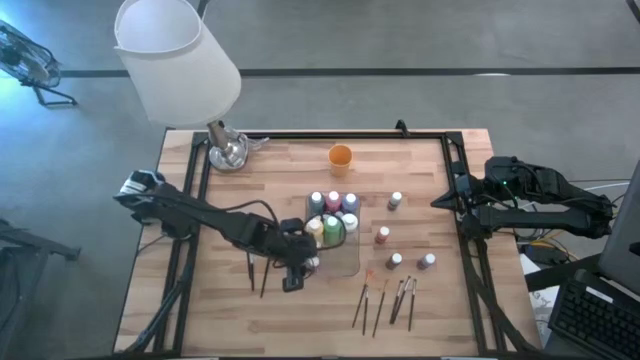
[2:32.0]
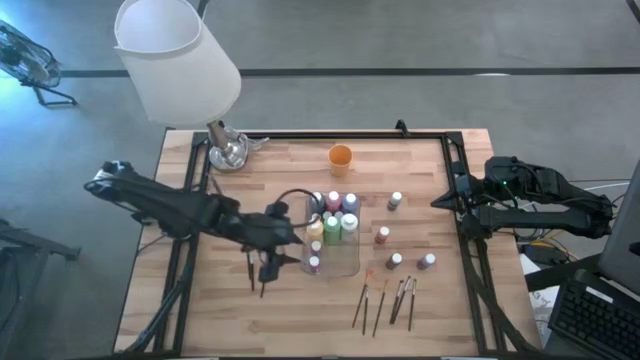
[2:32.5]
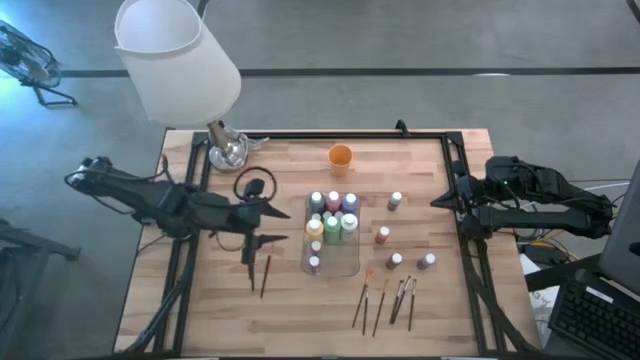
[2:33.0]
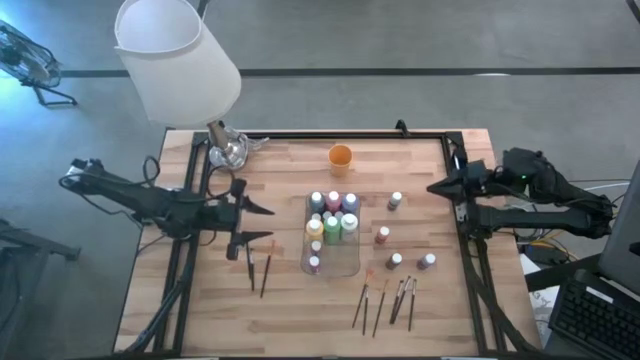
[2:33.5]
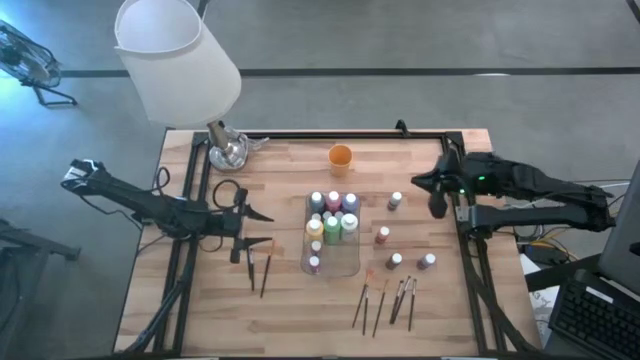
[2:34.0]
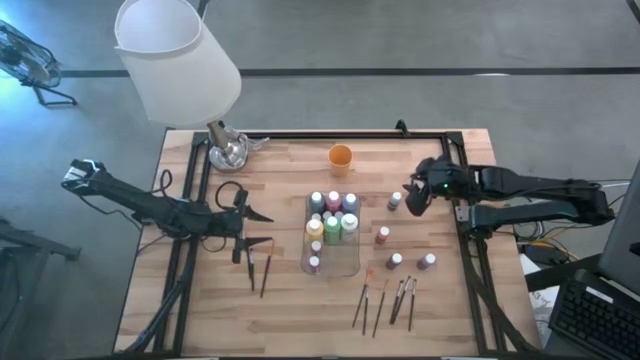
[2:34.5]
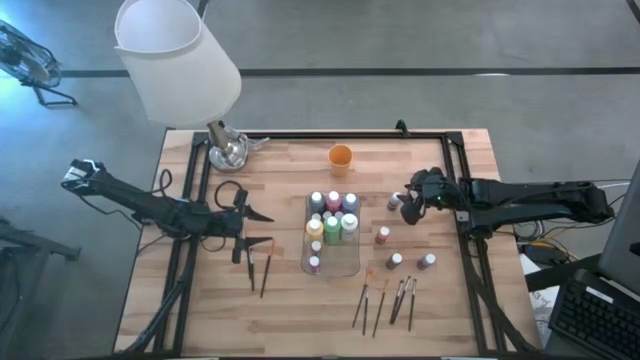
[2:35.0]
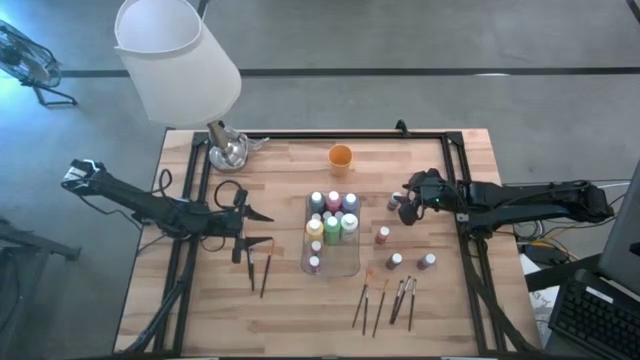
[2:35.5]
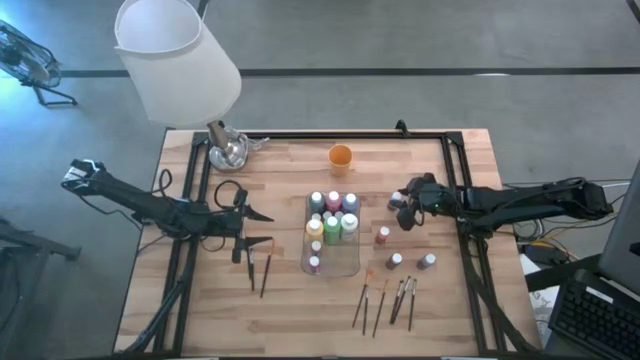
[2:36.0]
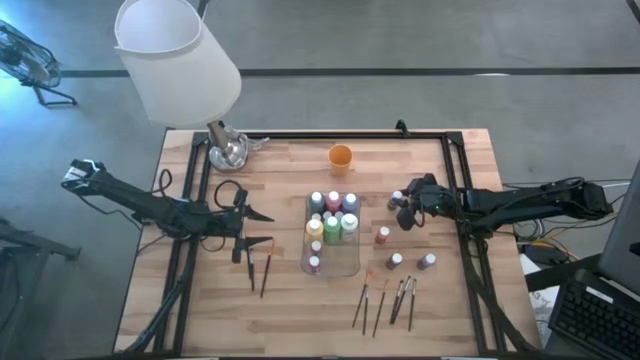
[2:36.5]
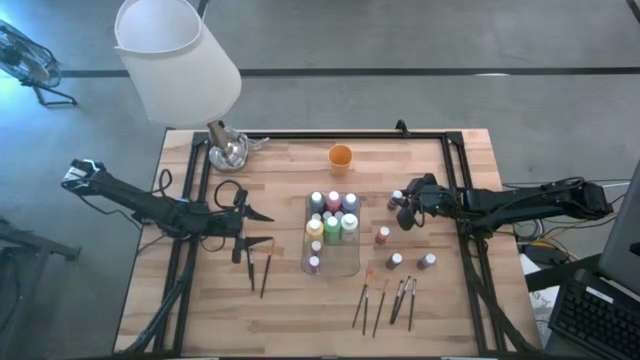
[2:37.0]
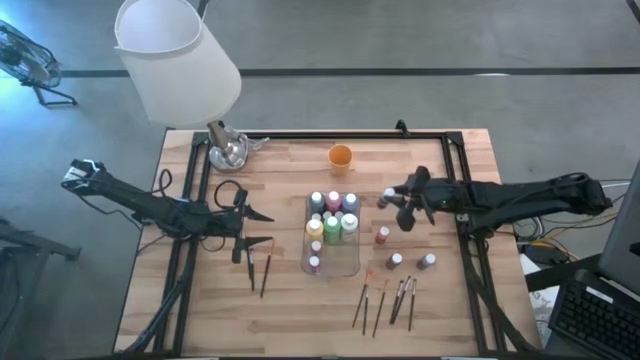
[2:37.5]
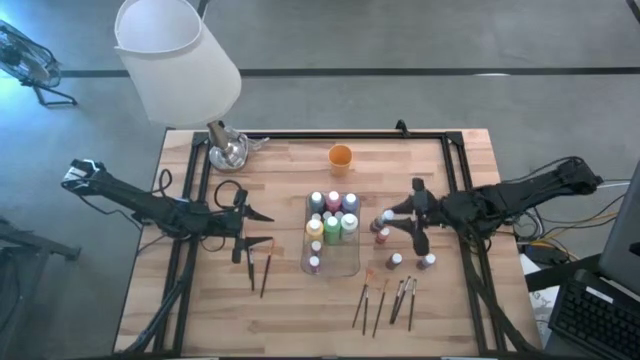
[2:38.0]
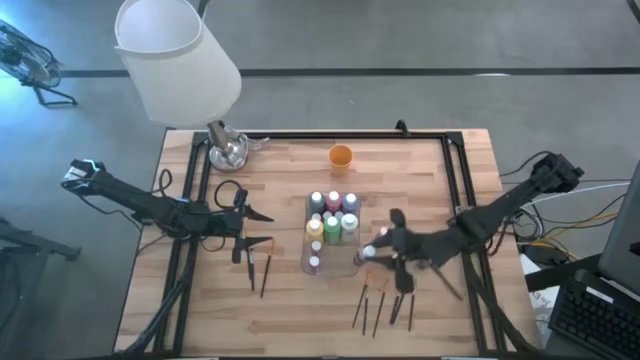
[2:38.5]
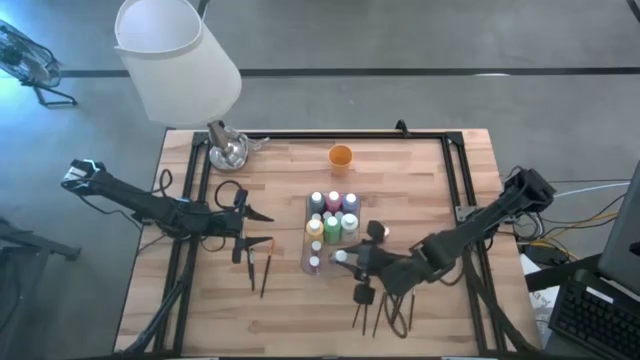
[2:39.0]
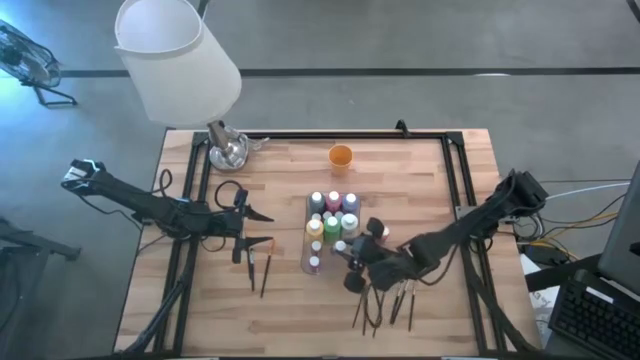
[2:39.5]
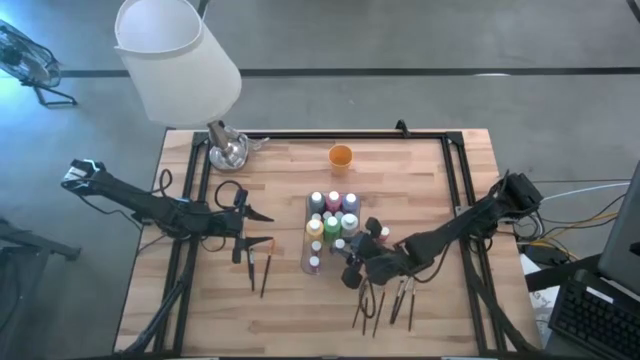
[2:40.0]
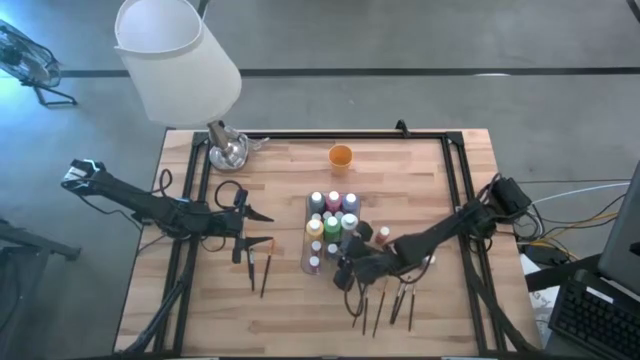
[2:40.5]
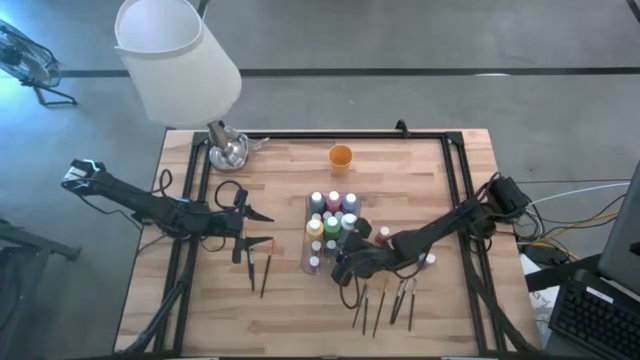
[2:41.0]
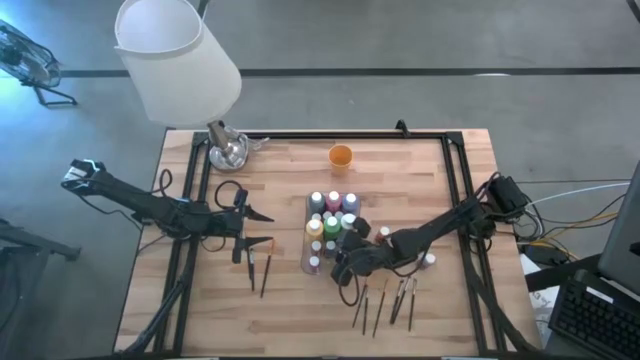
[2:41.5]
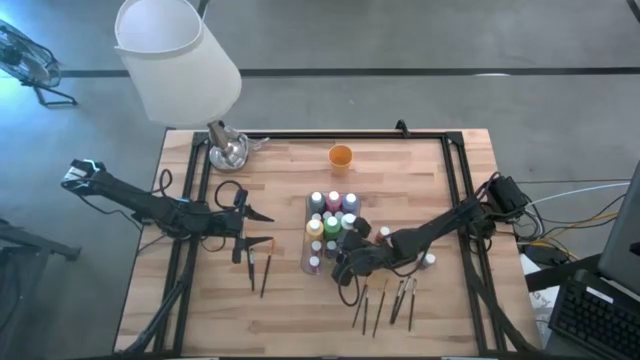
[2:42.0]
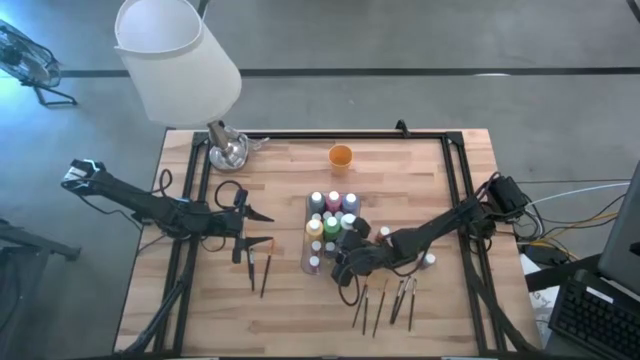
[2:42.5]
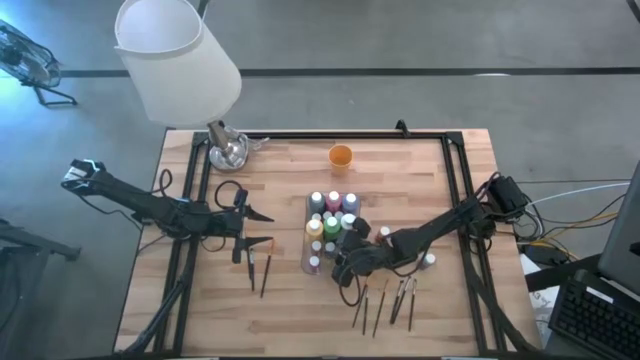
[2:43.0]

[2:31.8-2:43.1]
Task: Pick & Place Paint Supplies
Put the gray paint bottle into the transparent bin

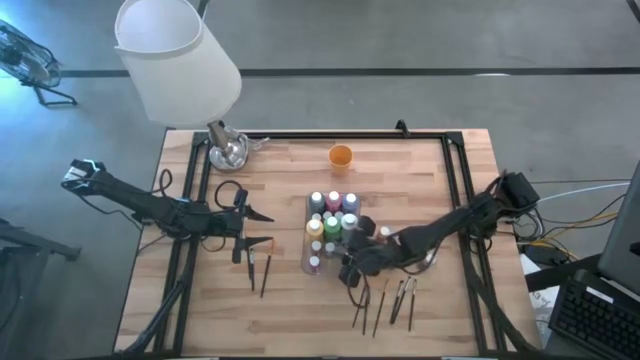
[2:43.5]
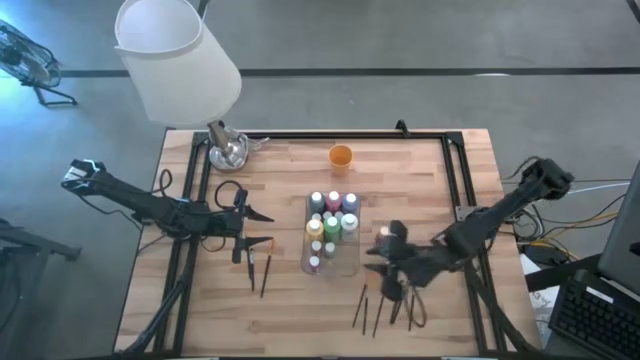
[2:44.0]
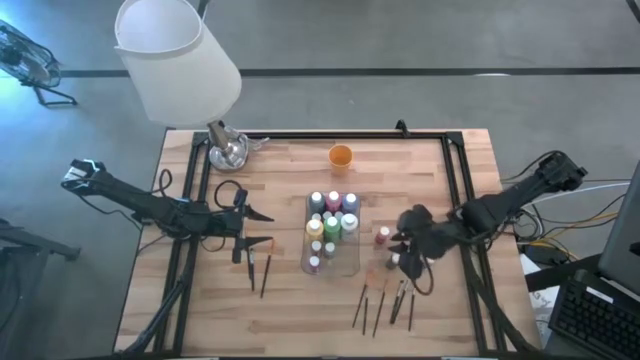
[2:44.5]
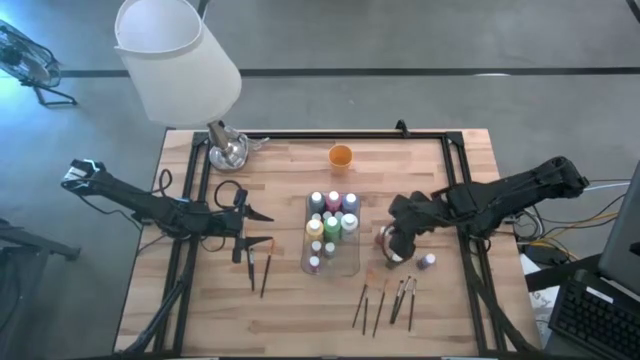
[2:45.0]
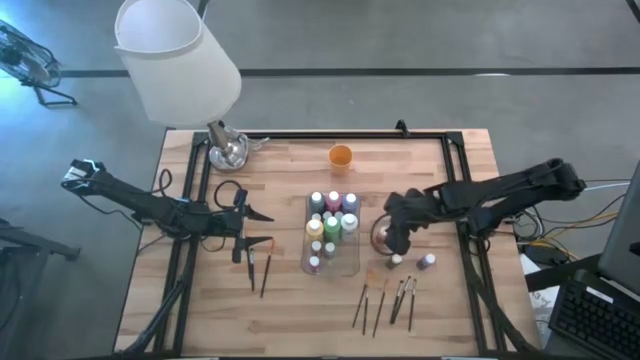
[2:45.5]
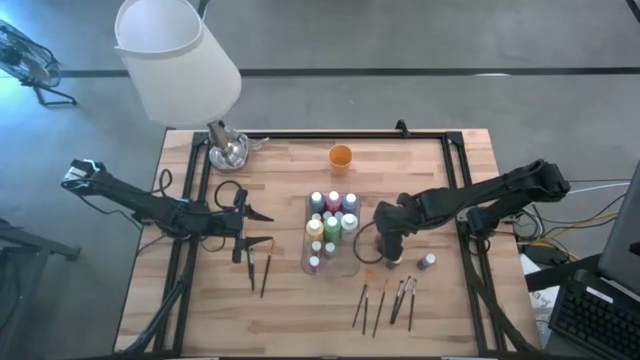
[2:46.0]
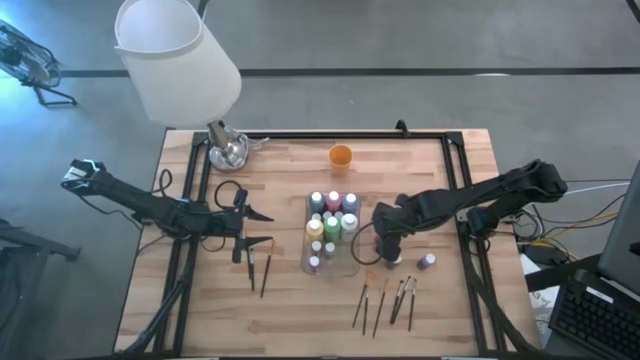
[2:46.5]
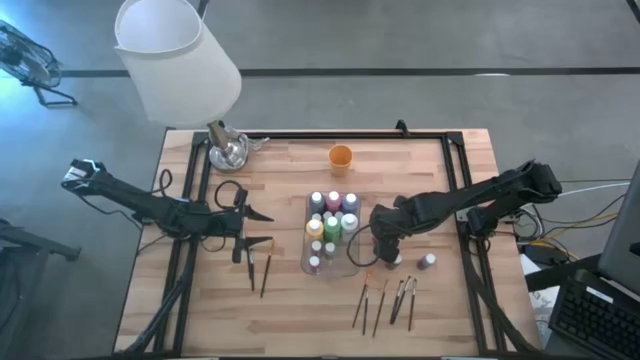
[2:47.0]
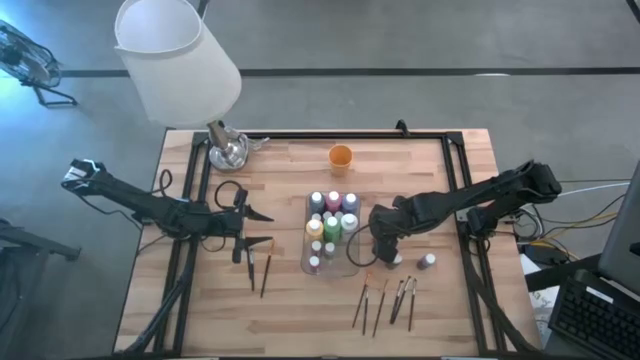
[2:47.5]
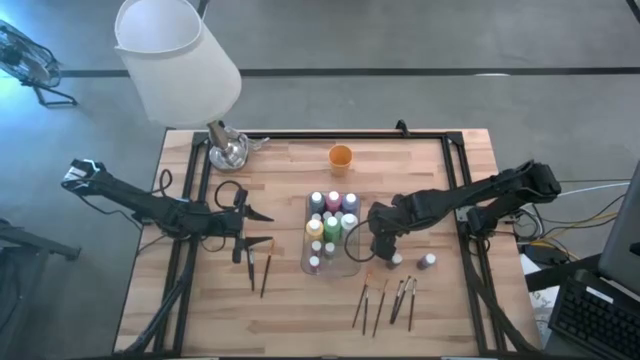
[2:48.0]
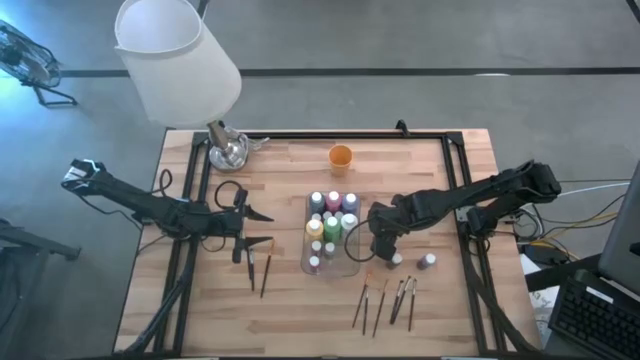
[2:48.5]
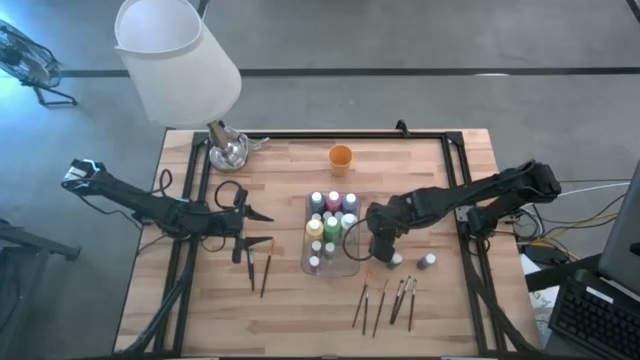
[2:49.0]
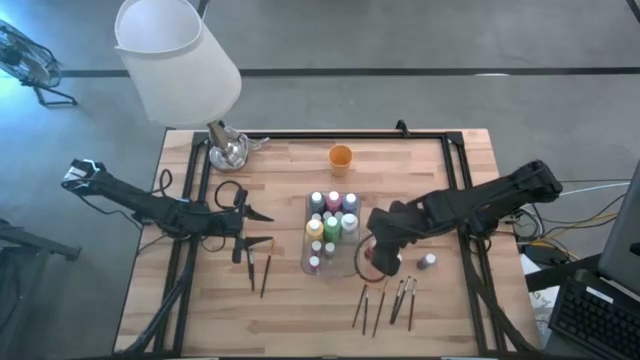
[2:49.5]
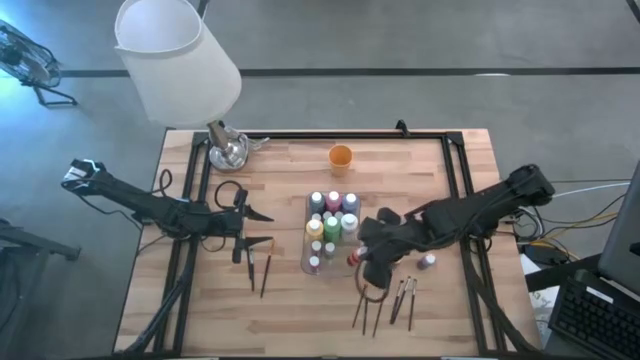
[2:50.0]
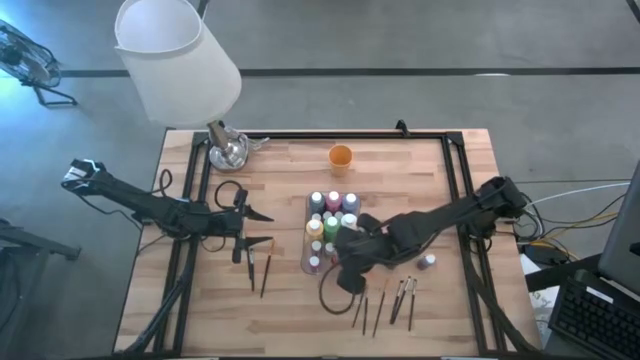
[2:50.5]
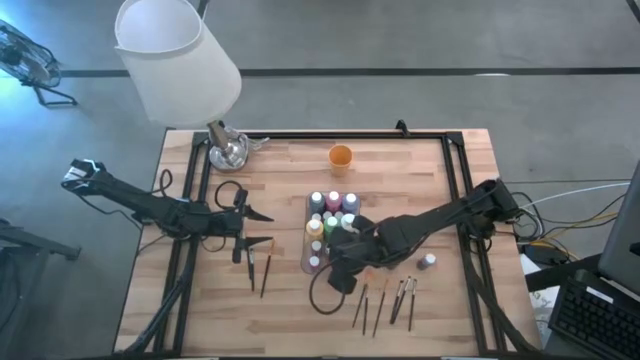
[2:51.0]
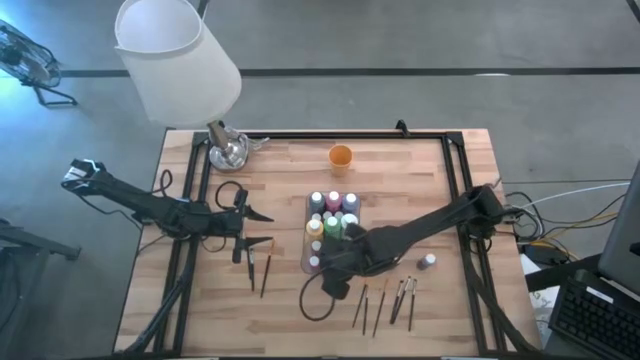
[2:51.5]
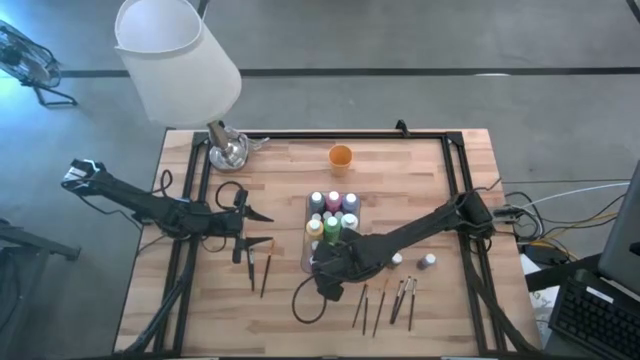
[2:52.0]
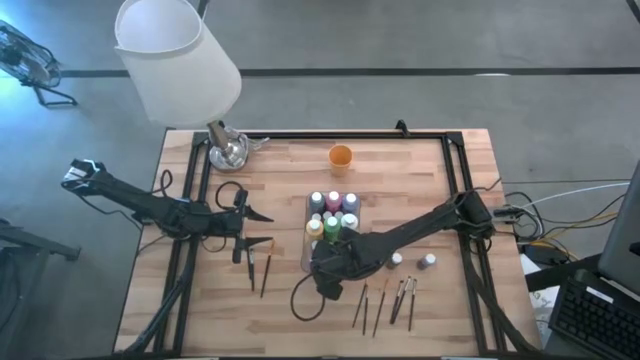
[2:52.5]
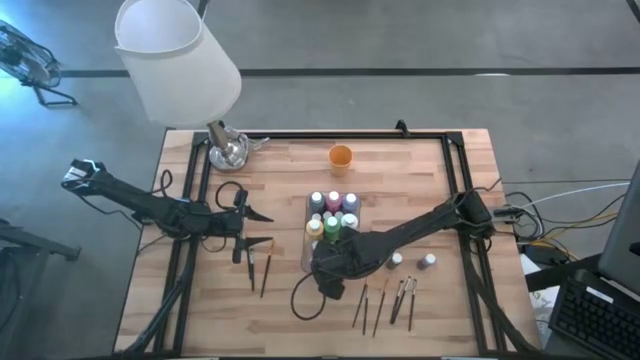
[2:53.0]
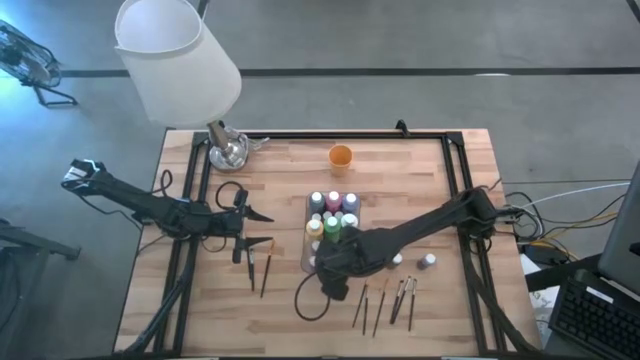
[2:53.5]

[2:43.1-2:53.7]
Put the orange paint bottle into the transparent bin
